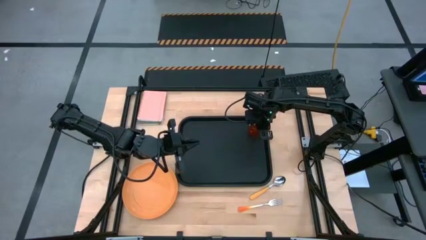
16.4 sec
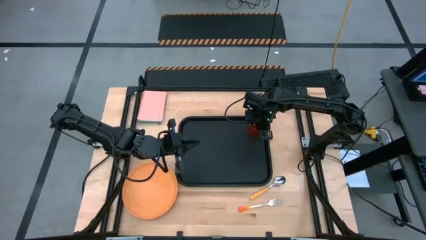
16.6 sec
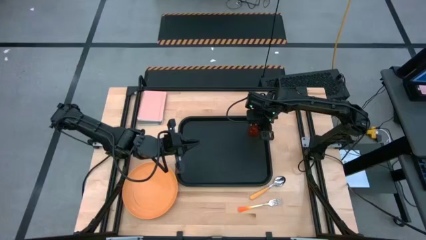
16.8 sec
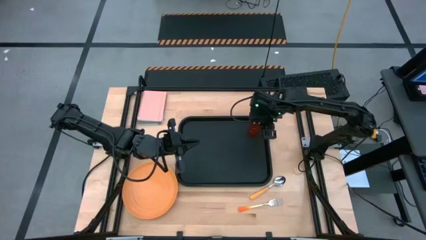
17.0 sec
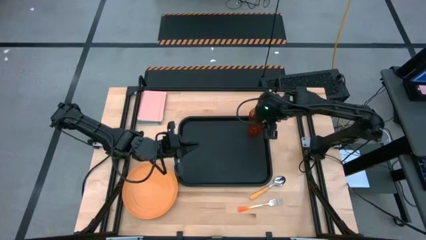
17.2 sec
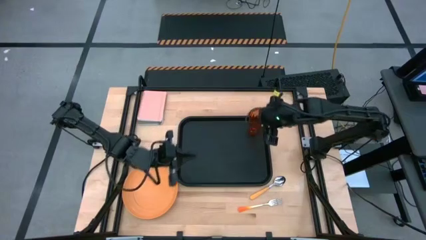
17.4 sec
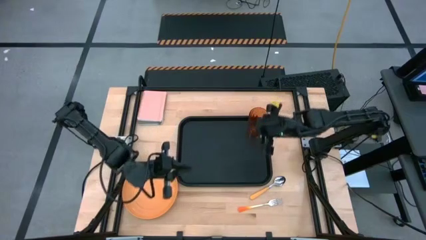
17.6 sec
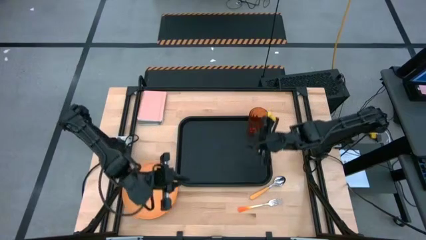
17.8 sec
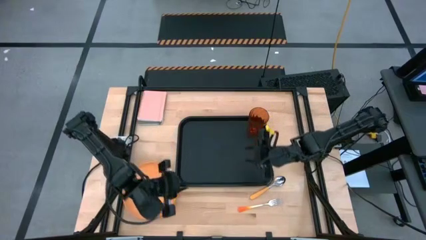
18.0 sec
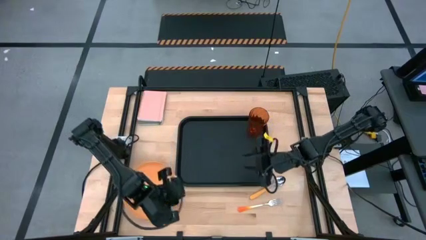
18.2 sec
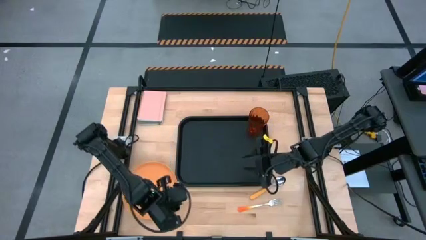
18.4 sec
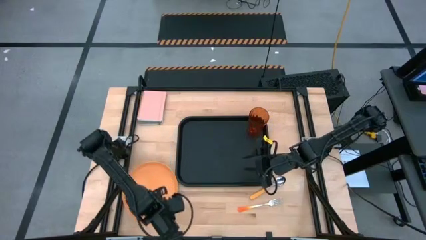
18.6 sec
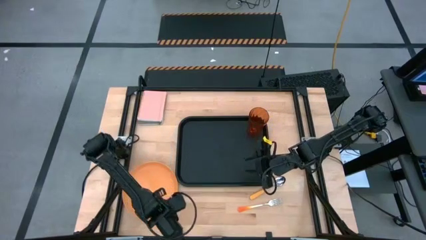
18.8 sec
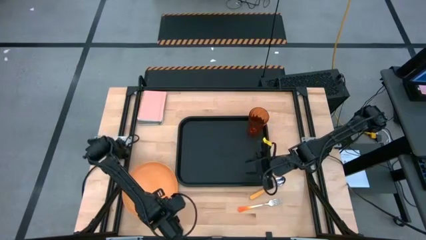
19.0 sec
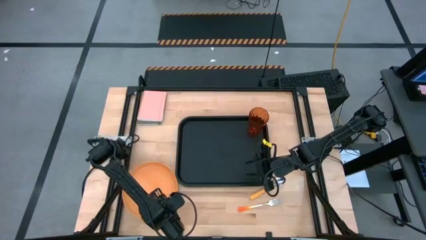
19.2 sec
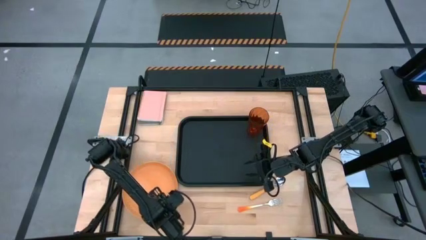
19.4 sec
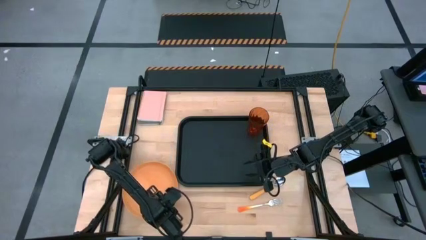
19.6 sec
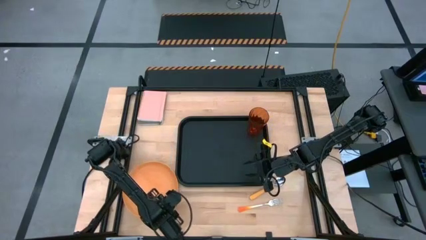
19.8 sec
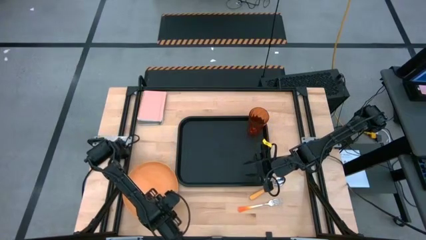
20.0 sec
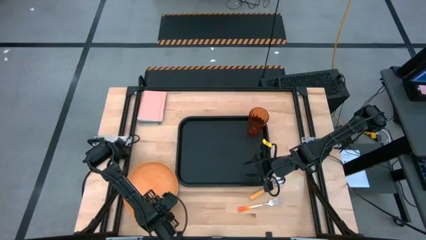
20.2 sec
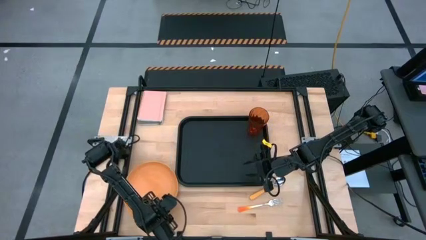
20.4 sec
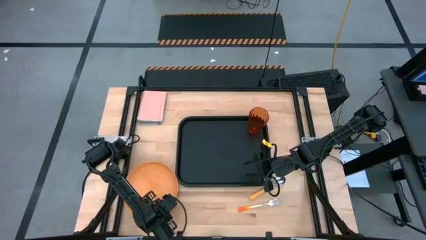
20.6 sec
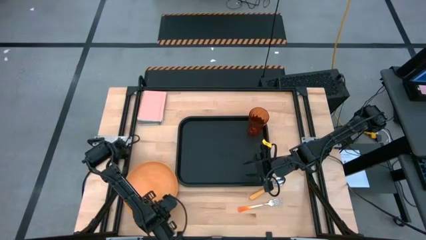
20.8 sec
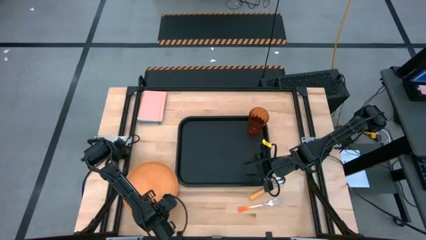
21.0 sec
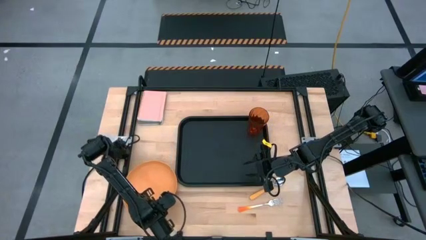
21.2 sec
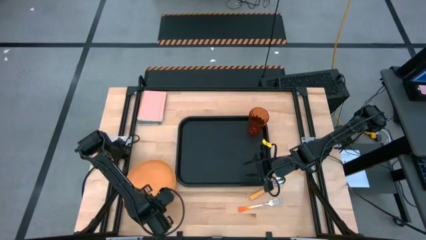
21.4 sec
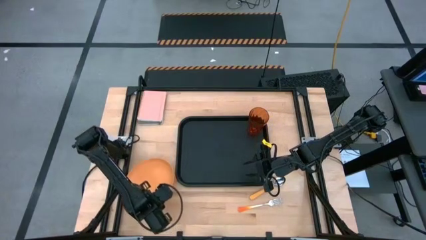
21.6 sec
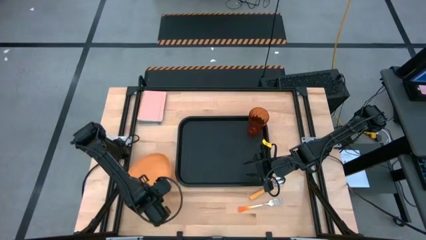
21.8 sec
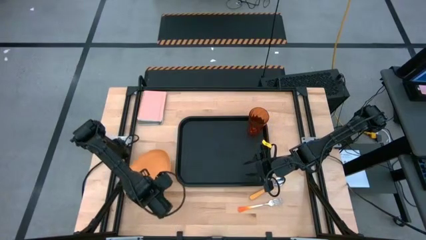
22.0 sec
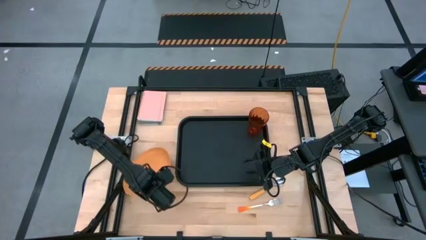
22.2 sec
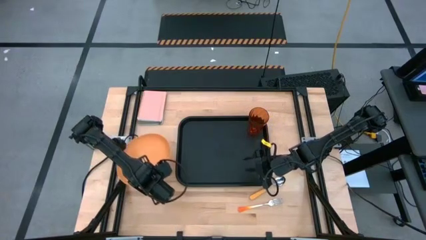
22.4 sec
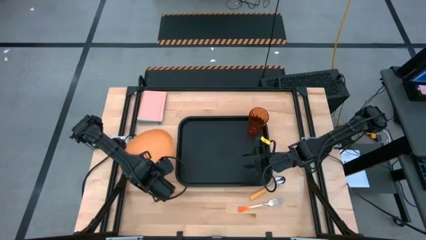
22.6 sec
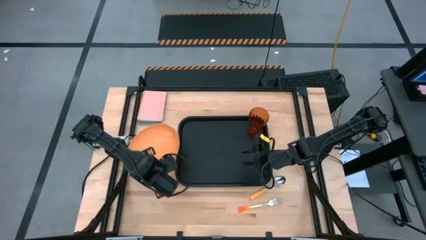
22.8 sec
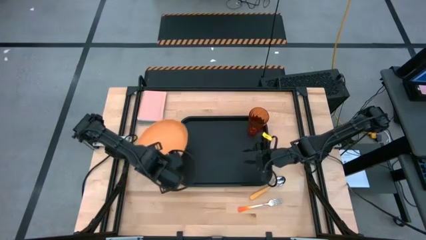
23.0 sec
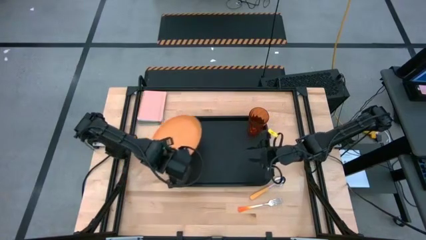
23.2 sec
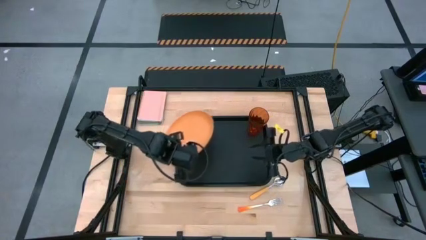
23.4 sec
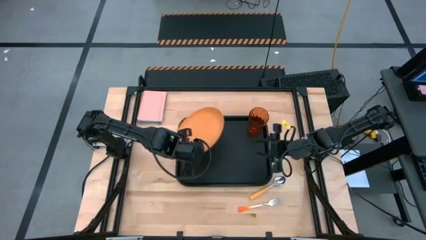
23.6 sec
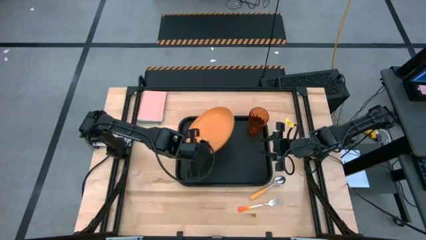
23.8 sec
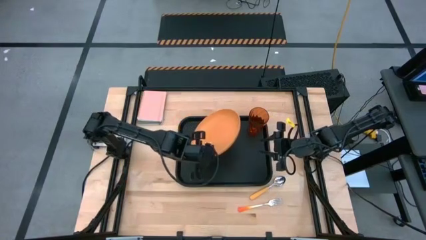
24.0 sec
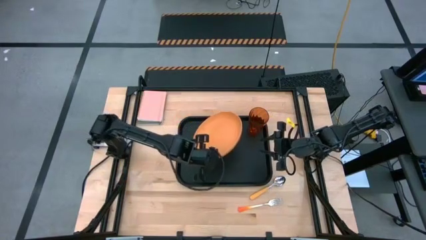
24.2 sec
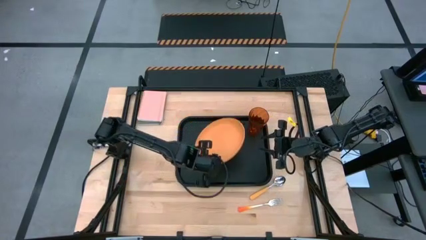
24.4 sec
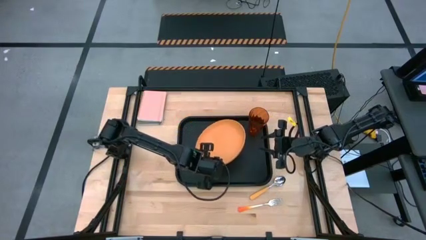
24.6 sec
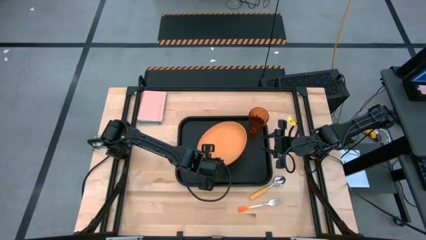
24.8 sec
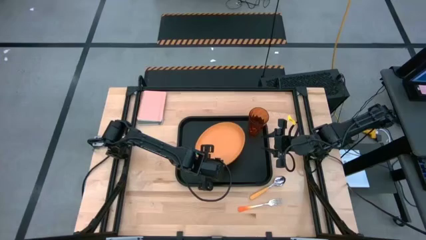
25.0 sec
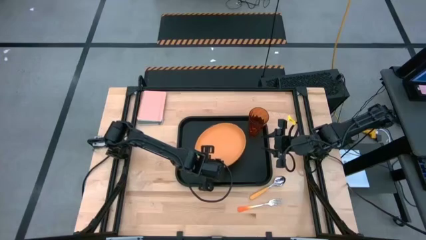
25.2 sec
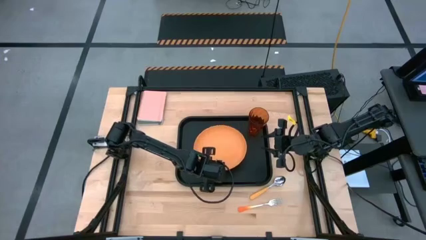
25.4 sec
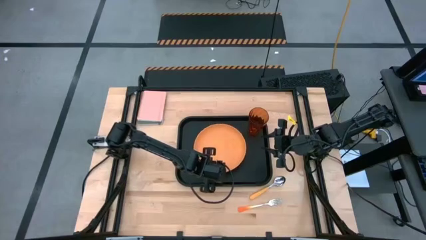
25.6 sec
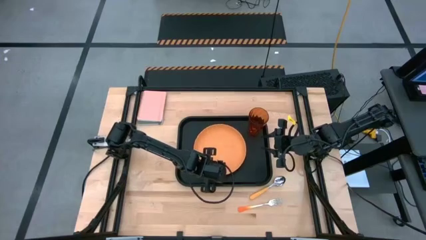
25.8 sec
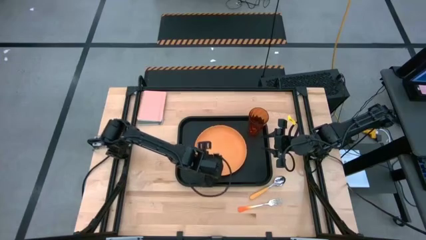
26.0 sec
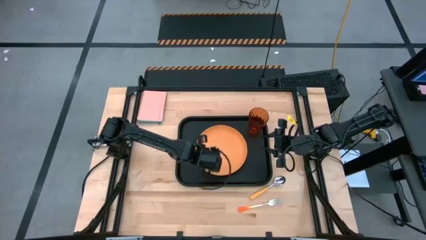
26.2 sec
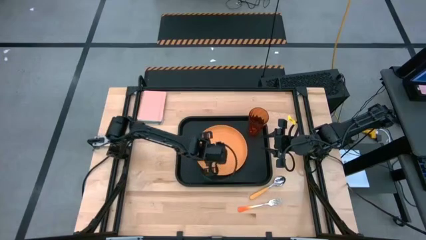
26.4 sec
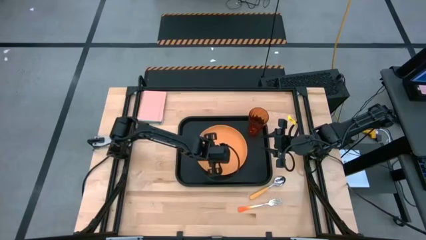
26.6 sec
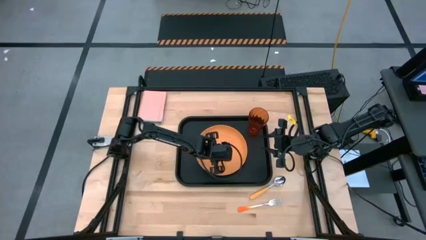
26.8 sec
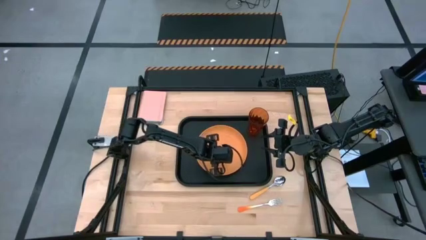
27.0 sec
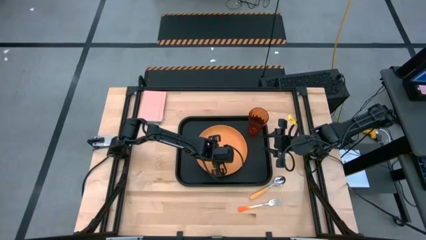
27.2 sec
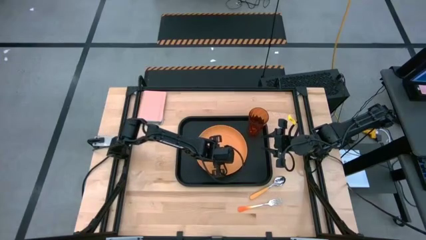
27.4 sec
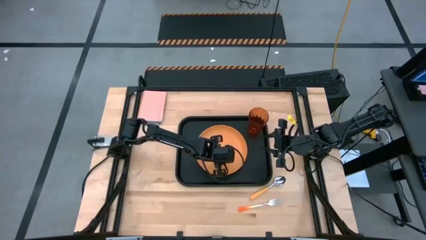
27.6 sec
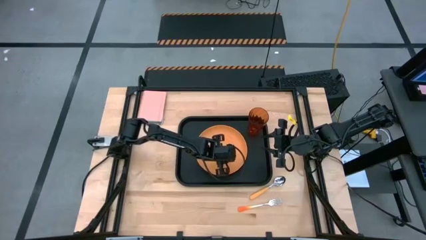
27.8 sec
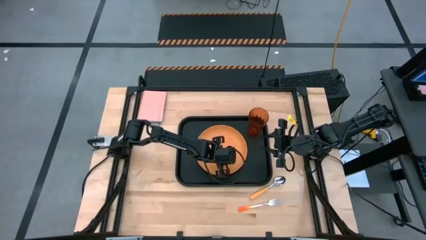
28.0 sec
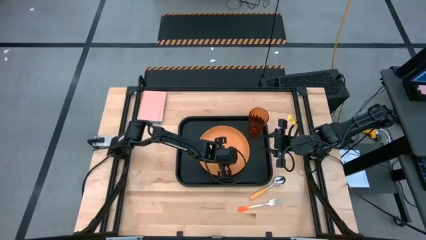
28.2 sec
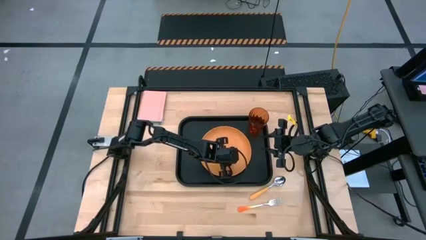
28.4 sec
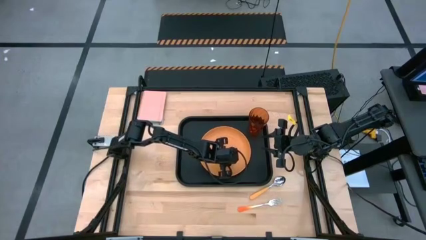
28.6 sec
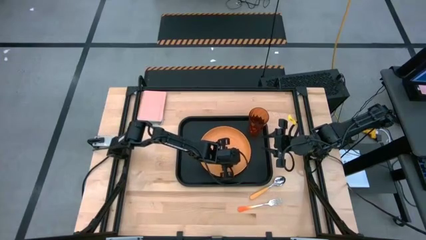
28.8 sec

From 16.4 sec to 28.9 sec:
Task: Pick and place plate/cup/fork/spoon on tray
Put the orange plate in the center of the black tray
